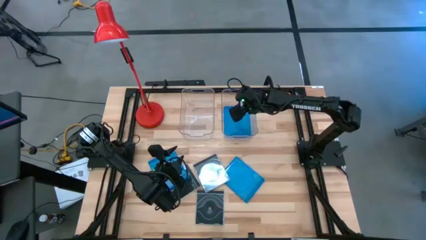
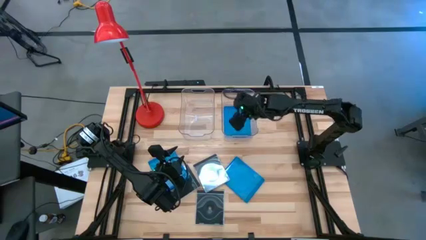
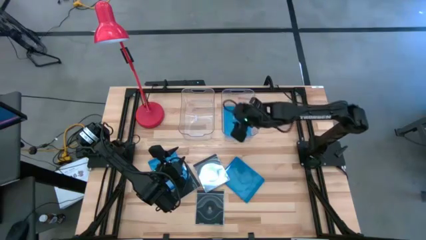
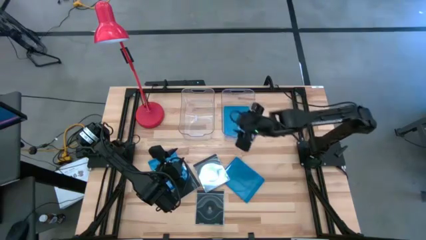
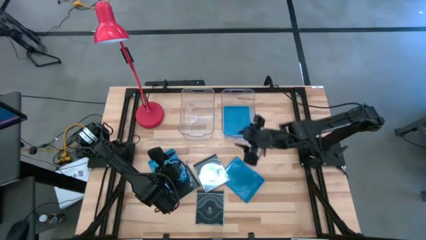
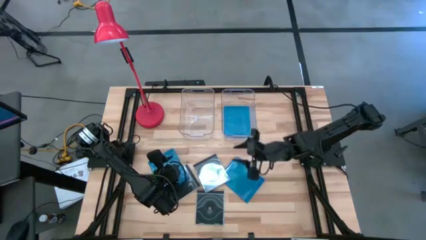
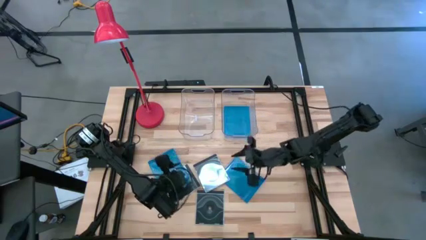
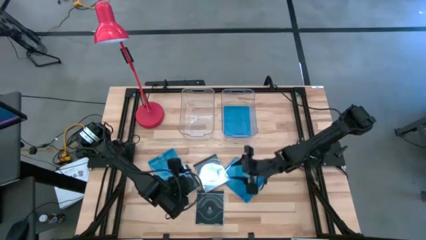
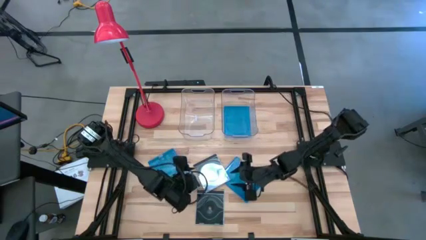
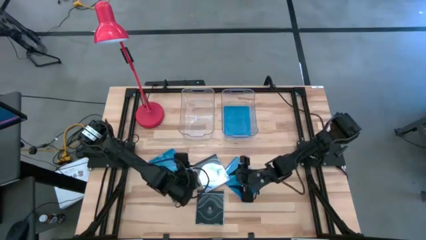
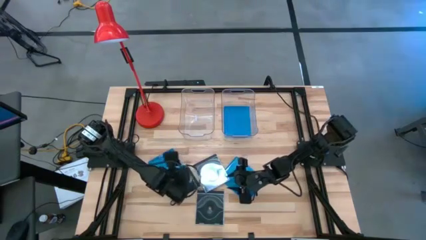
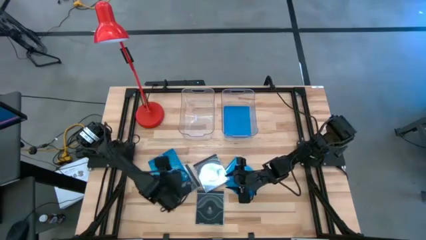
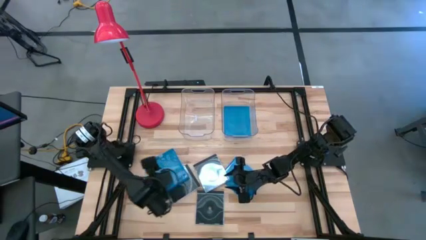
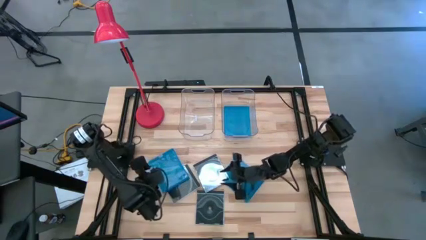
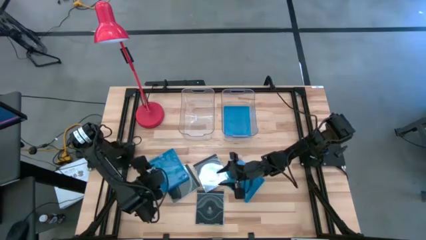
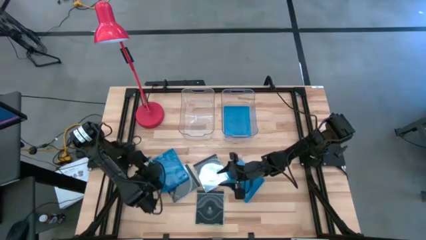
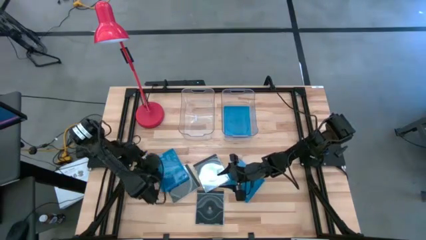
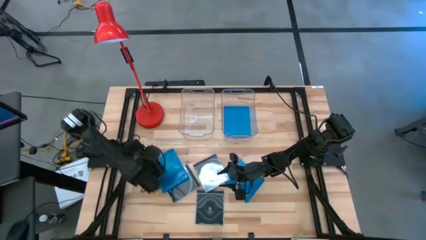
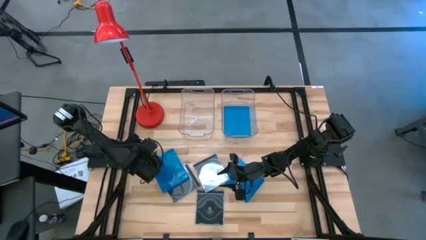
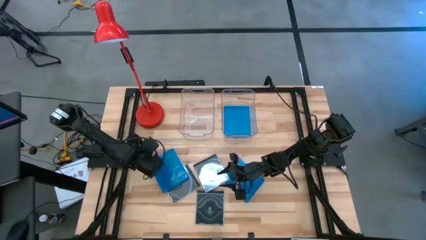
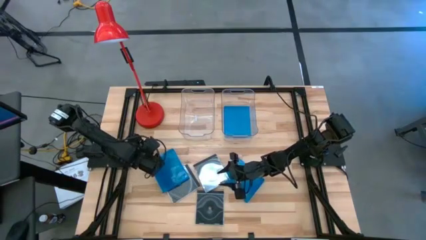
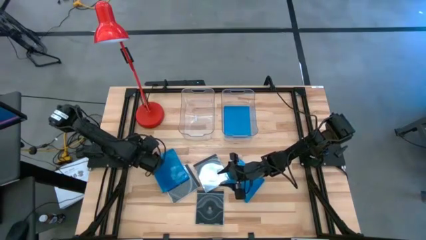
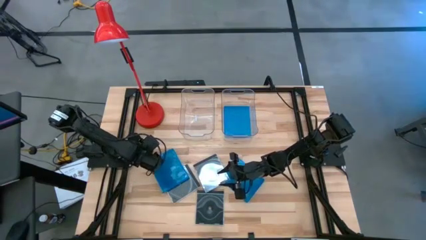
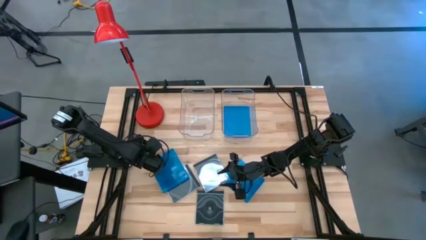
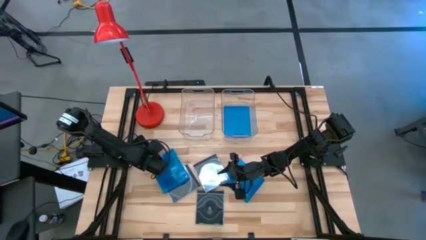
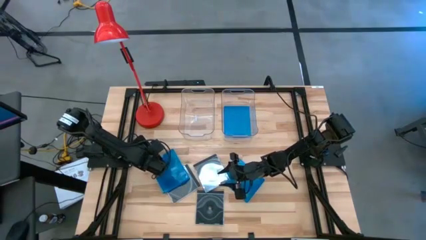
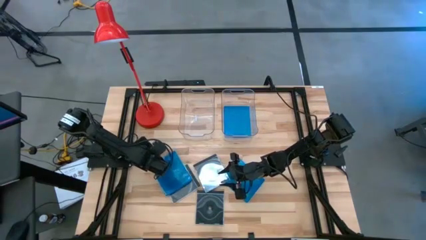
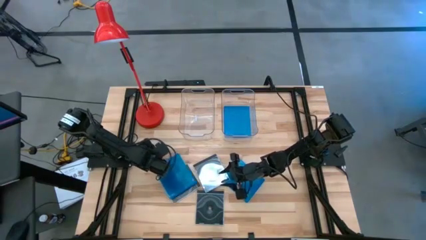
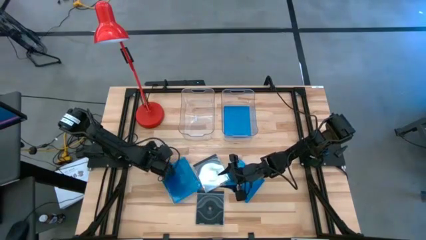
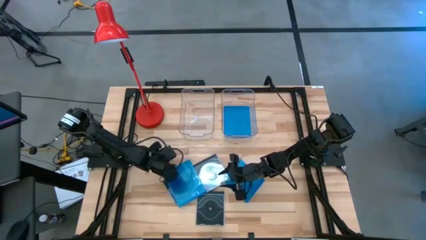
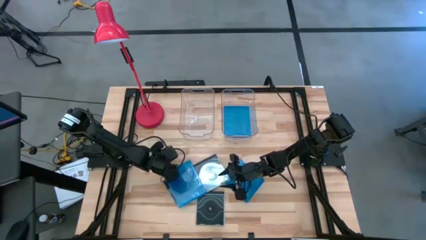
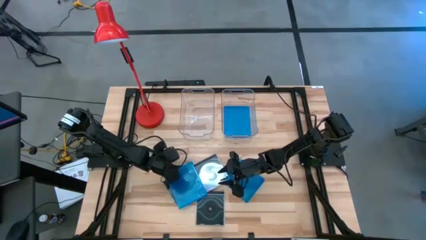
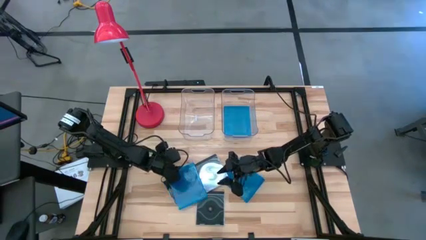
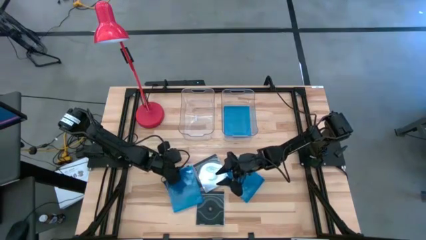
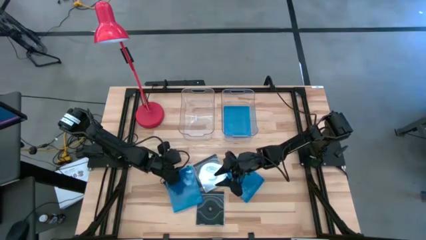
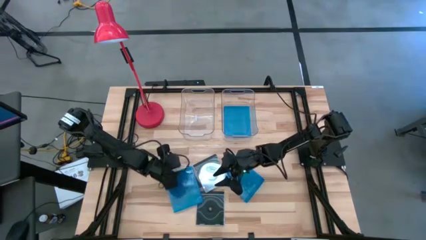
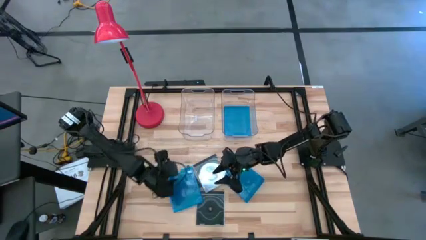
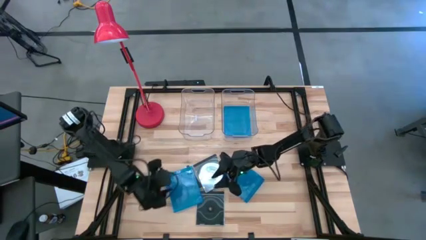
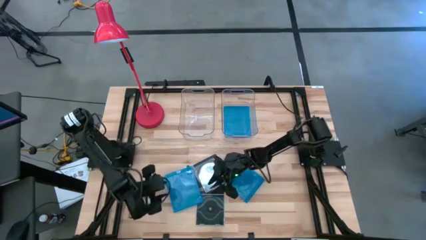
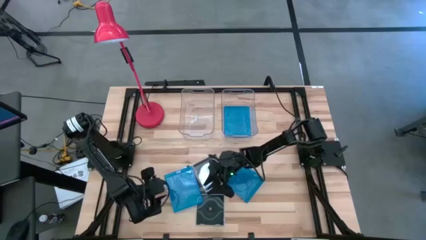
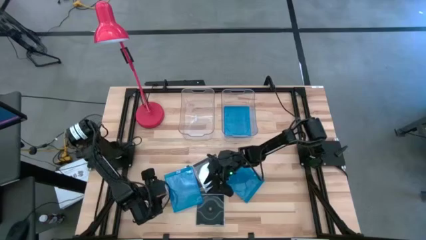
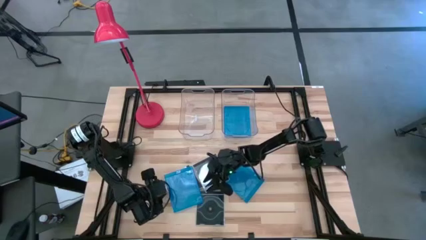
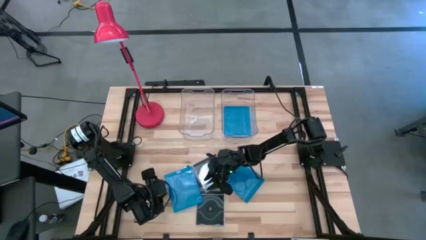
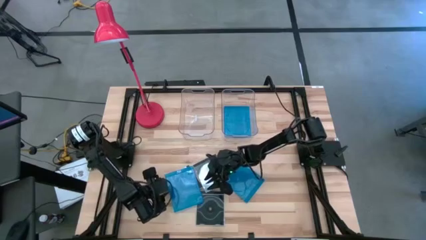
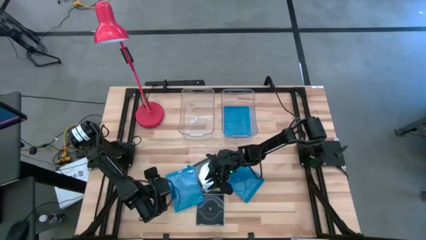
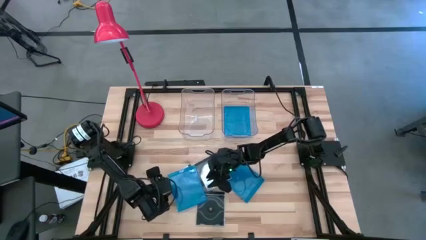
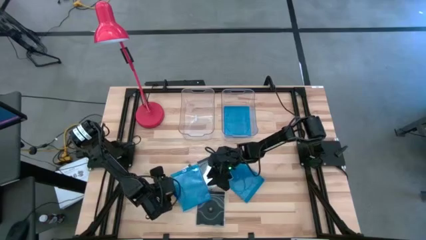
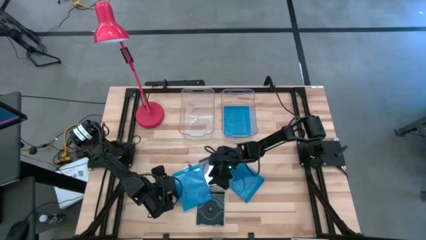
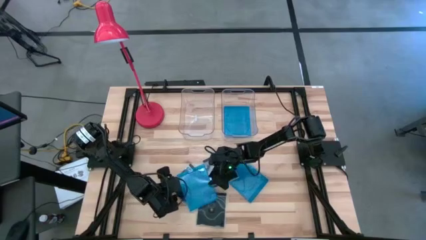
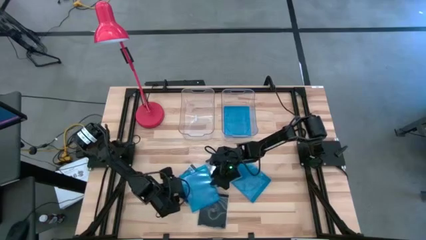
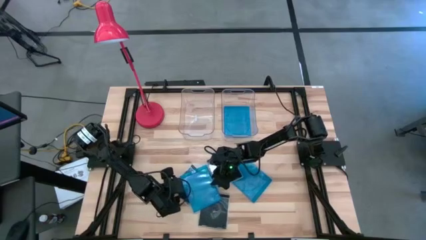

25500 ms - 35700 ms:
Task: Pick & place jewel cases by type
Put the left blue cd case into the right transparent bin

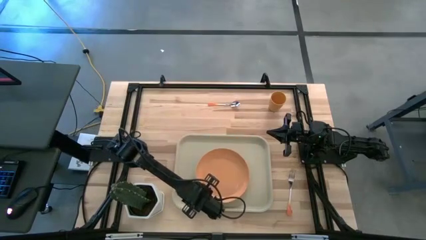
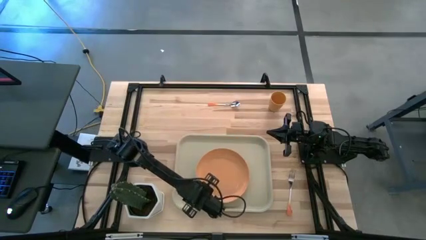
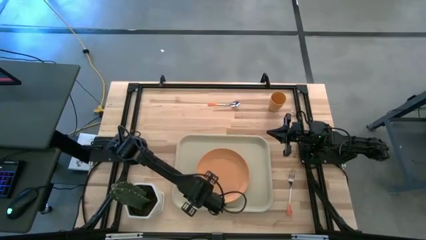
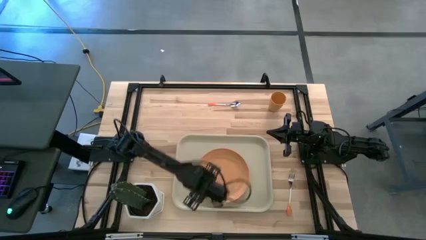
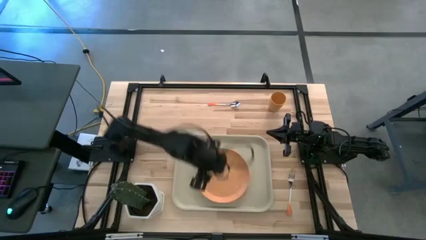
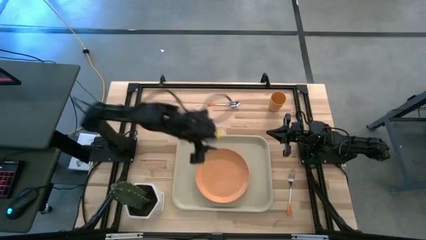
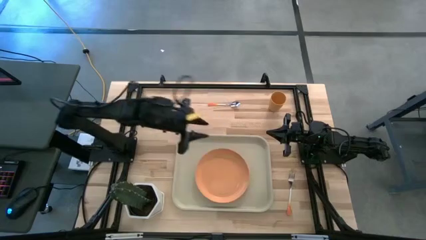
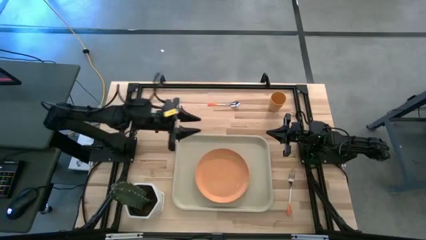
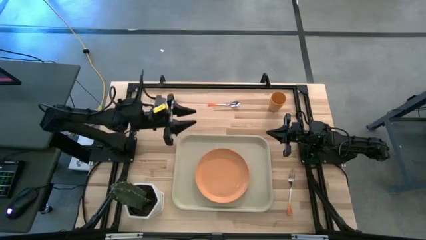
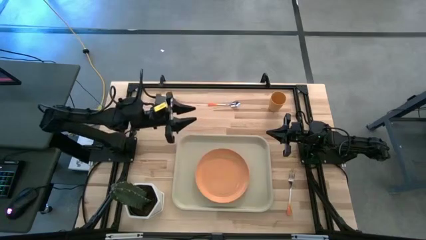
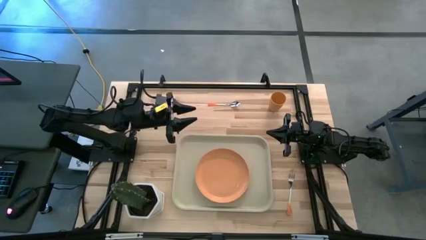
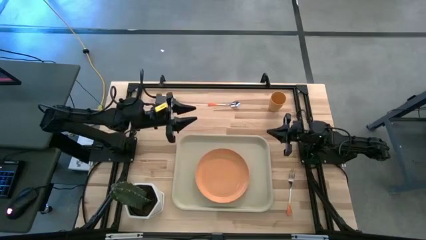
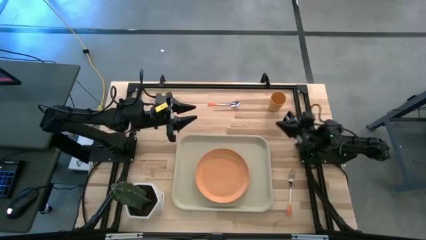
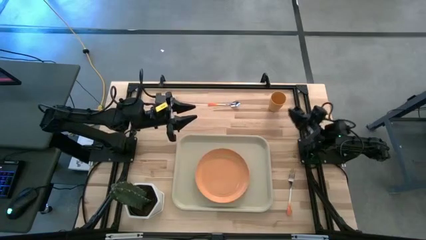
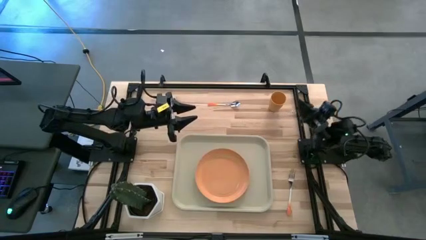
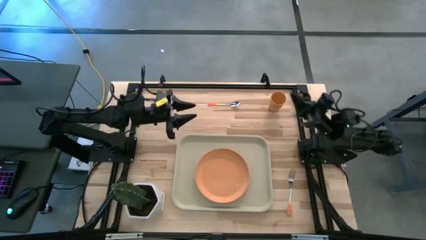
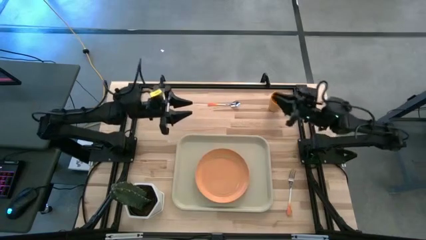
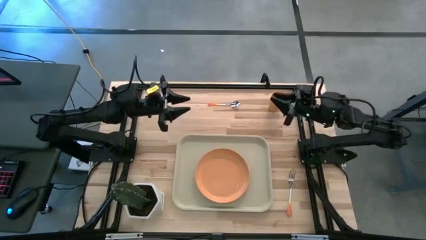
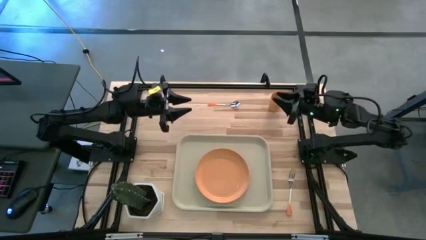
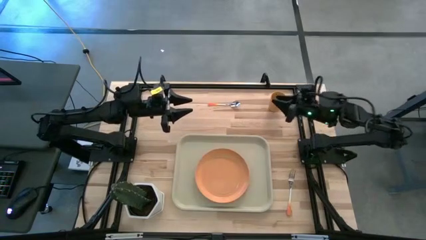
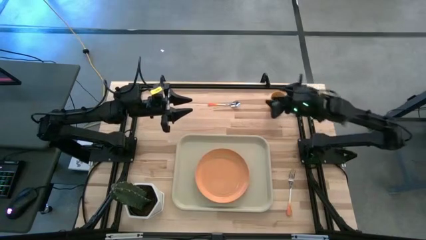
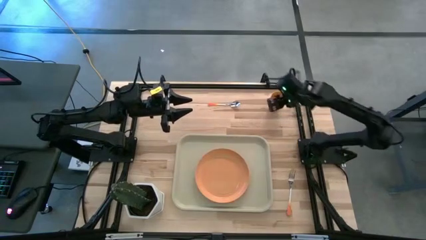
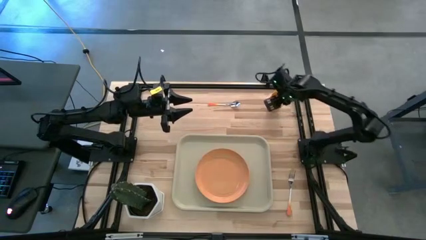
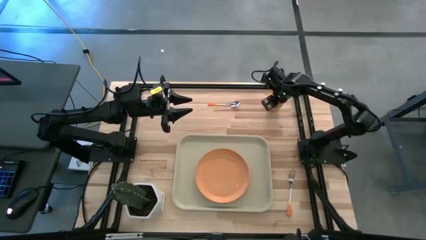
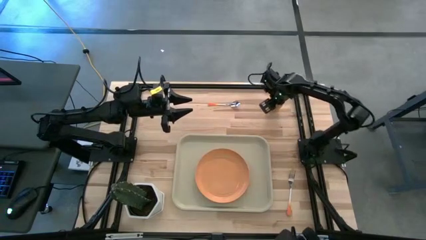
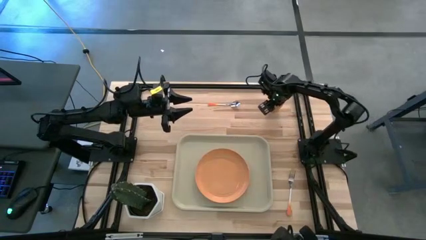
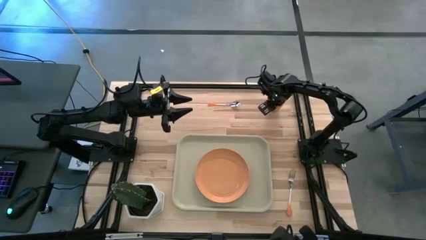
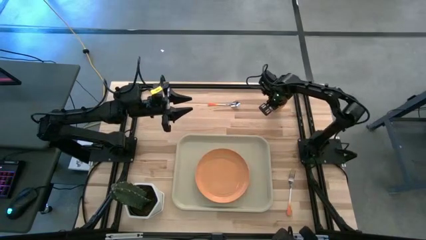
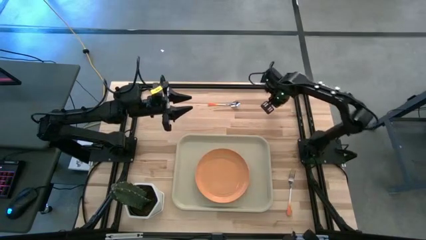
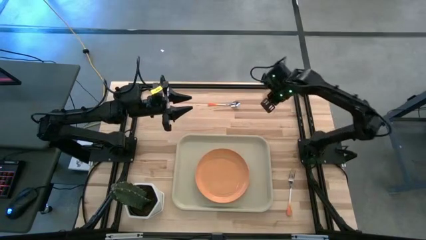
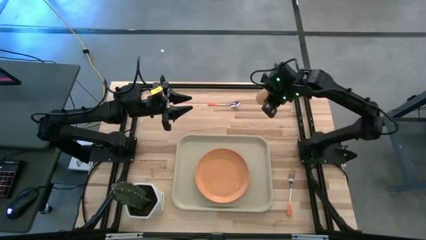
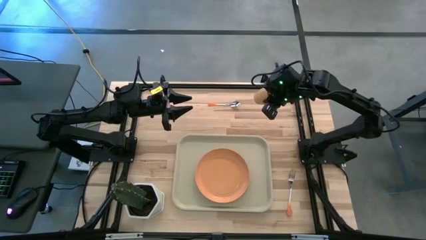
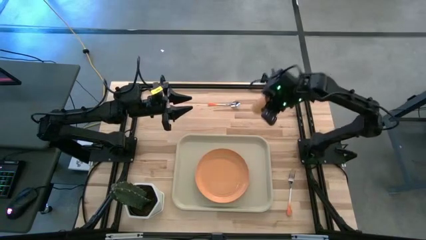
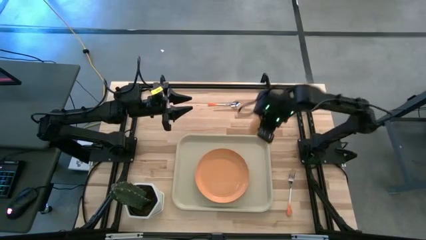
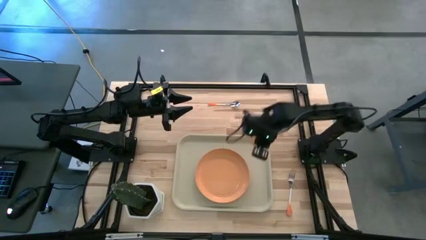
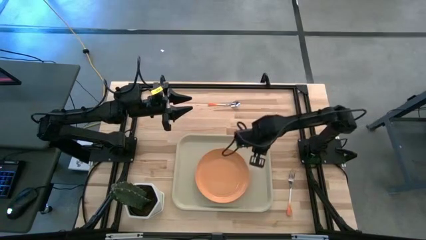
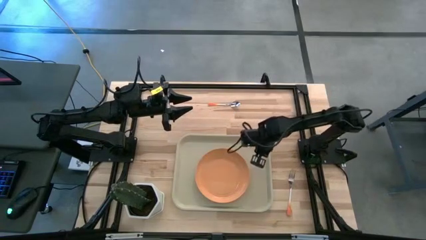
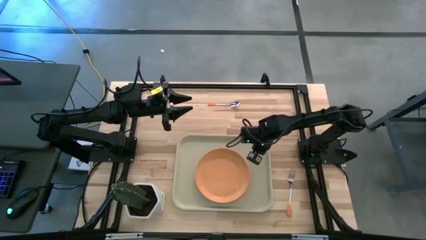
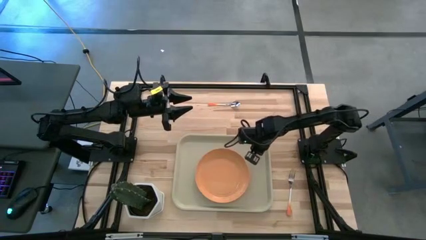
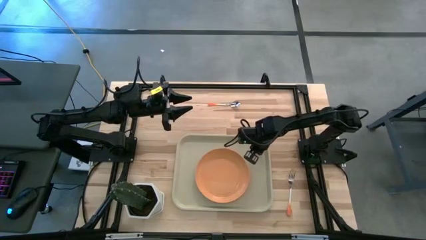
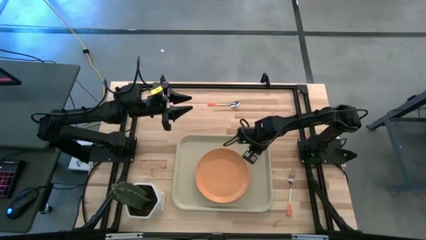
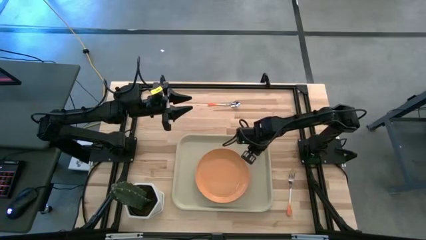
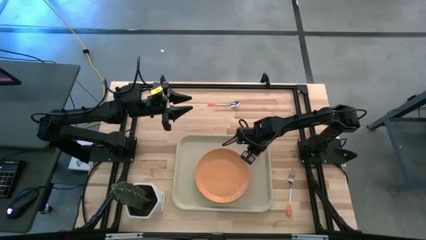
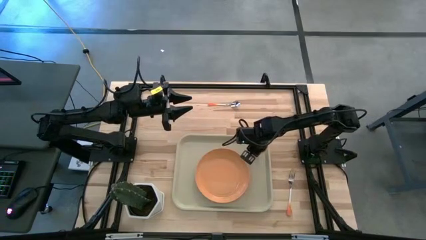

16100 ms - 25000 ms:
Task: Pick and place plate/cup/fork/spoon on tray
Put the orange cup on the top right of the orange plate on the gray tray
